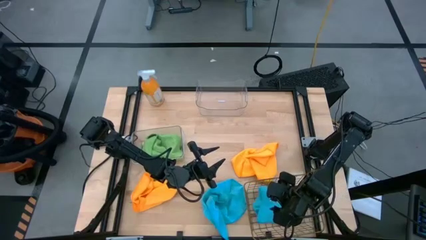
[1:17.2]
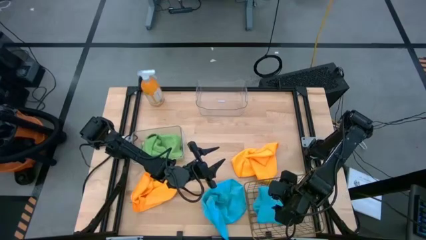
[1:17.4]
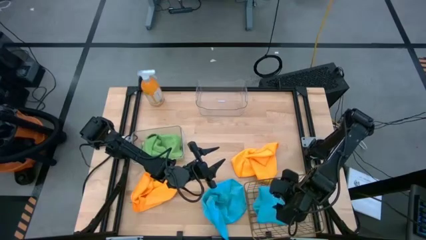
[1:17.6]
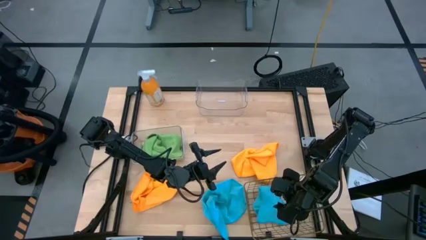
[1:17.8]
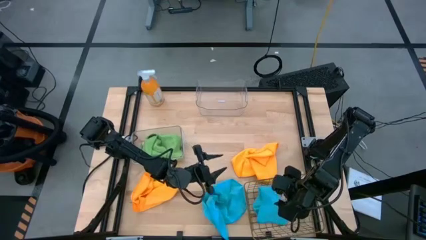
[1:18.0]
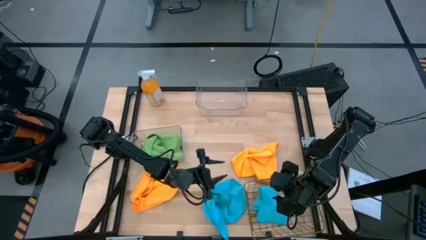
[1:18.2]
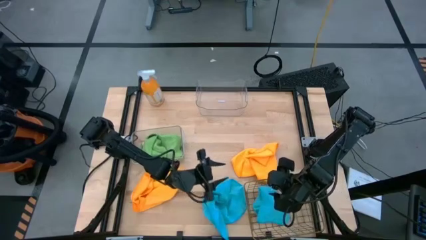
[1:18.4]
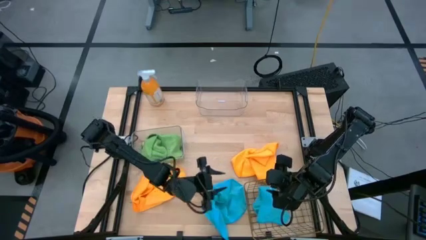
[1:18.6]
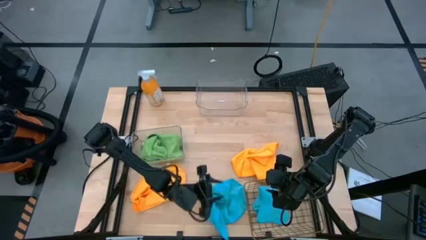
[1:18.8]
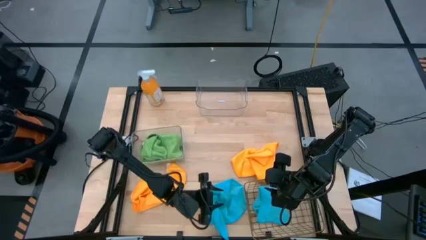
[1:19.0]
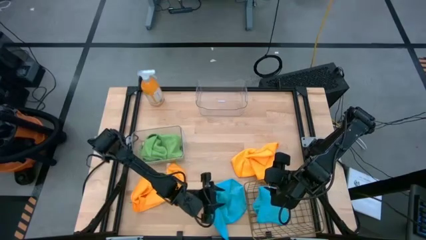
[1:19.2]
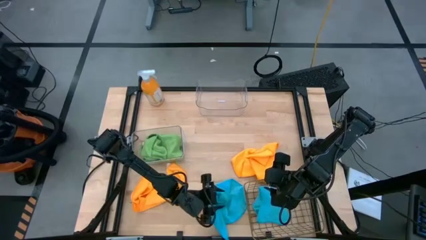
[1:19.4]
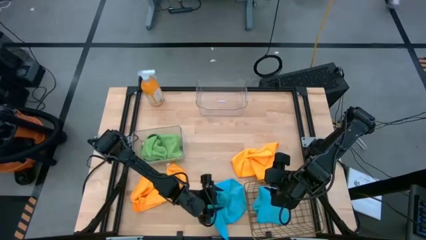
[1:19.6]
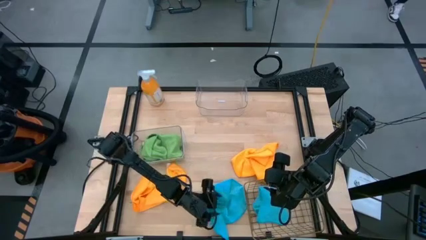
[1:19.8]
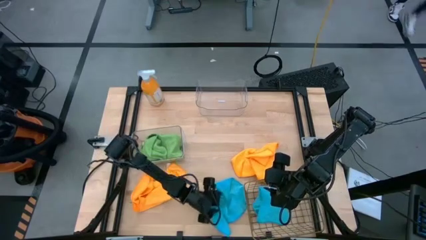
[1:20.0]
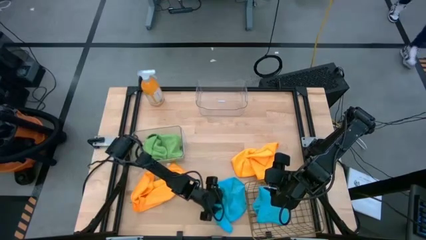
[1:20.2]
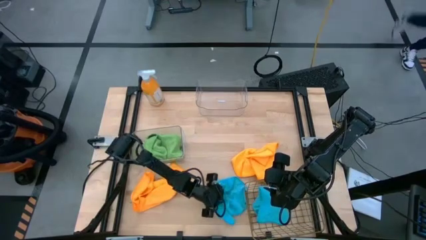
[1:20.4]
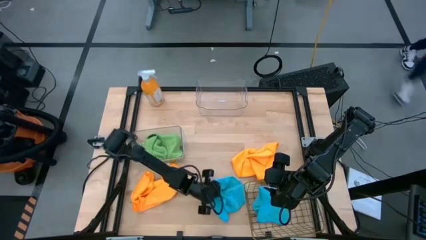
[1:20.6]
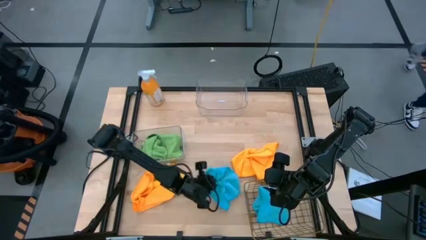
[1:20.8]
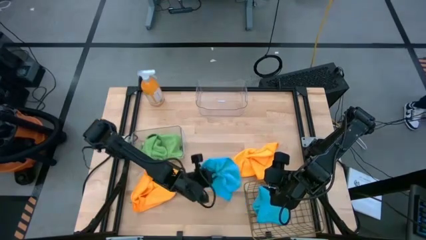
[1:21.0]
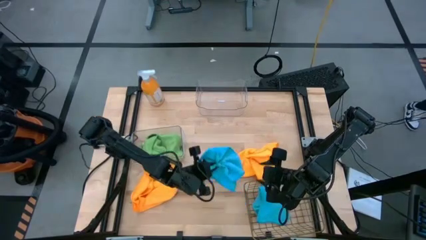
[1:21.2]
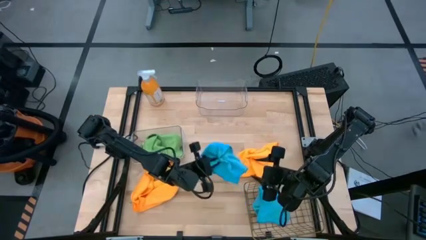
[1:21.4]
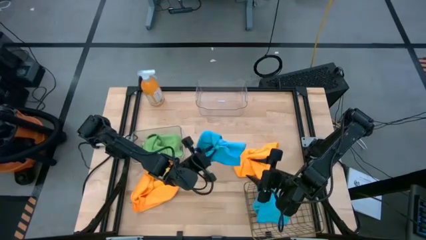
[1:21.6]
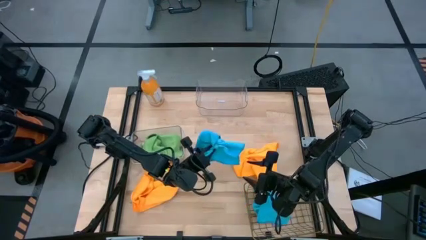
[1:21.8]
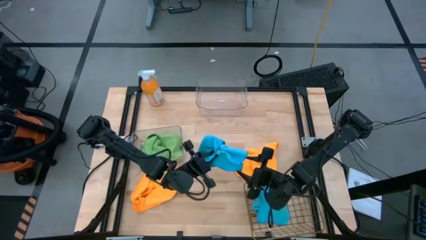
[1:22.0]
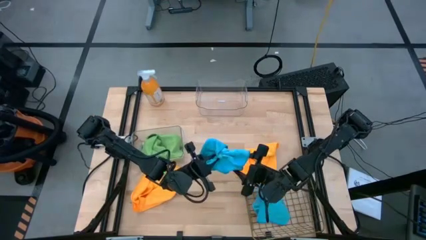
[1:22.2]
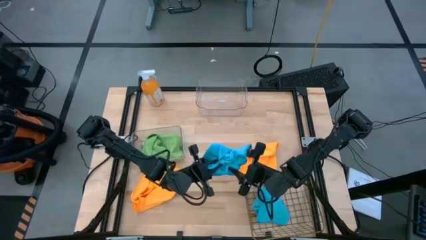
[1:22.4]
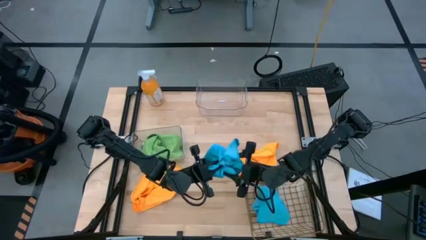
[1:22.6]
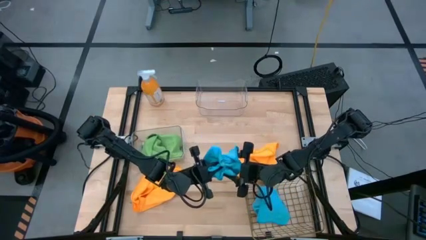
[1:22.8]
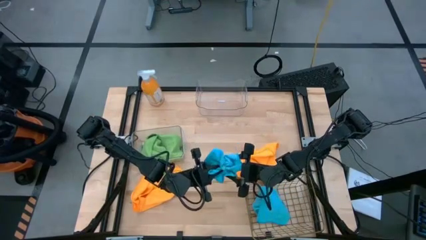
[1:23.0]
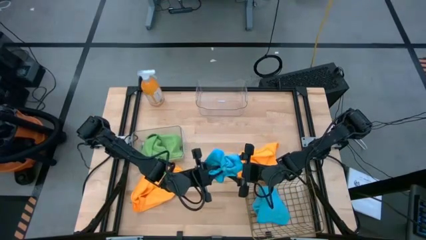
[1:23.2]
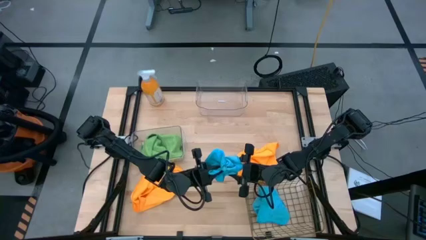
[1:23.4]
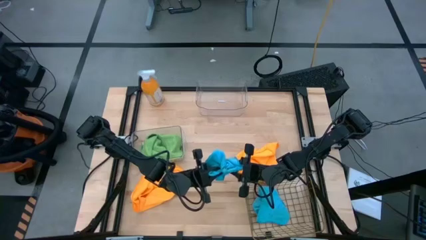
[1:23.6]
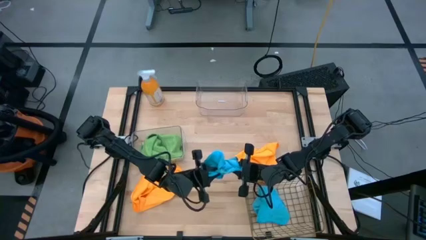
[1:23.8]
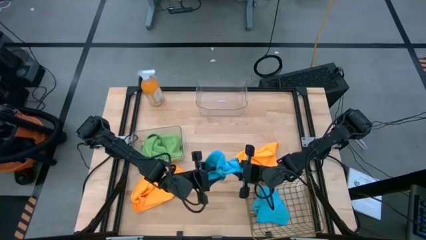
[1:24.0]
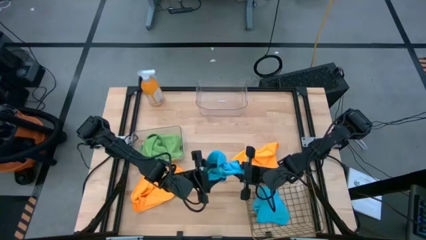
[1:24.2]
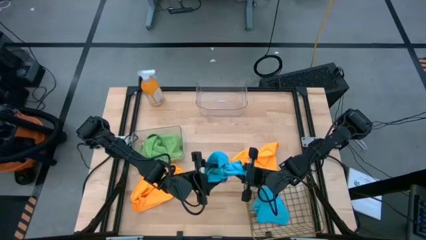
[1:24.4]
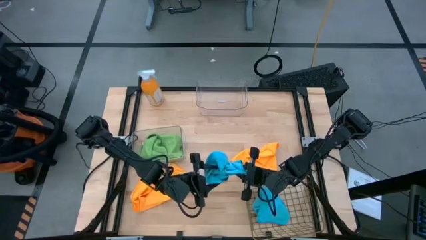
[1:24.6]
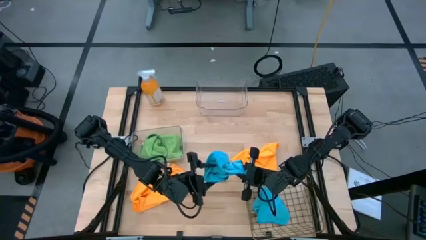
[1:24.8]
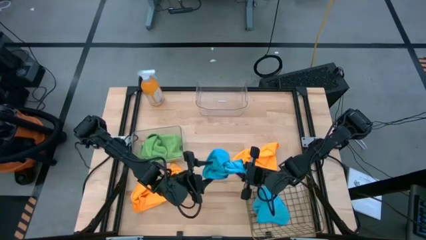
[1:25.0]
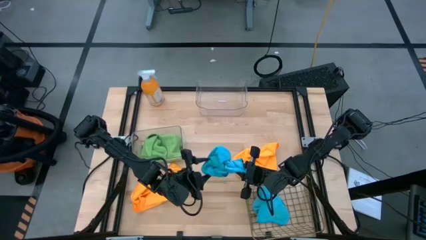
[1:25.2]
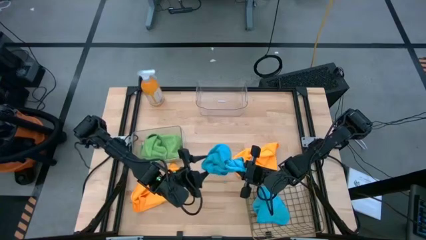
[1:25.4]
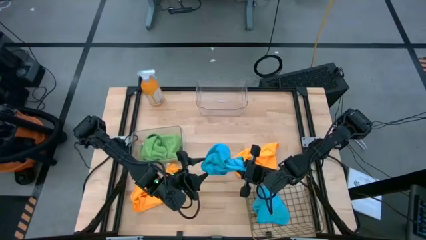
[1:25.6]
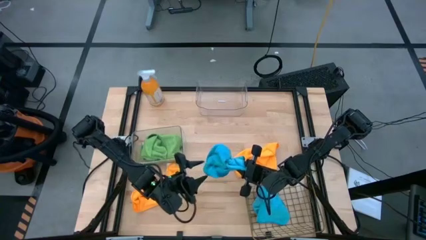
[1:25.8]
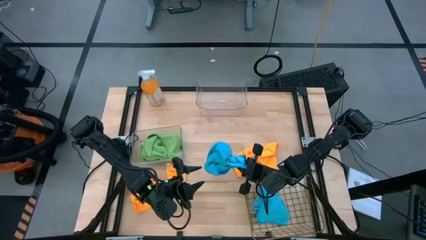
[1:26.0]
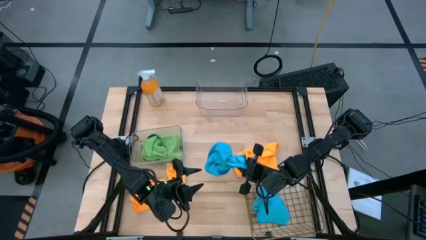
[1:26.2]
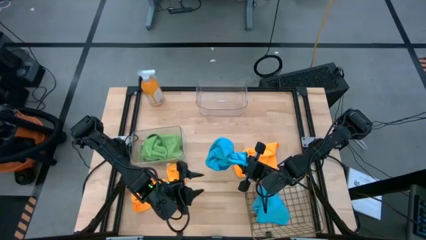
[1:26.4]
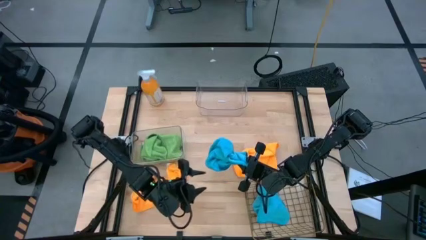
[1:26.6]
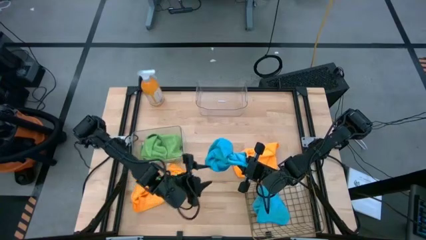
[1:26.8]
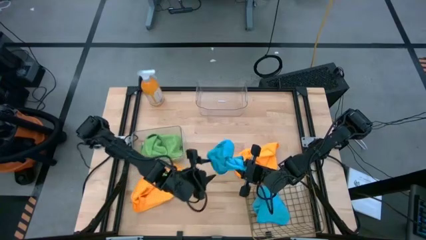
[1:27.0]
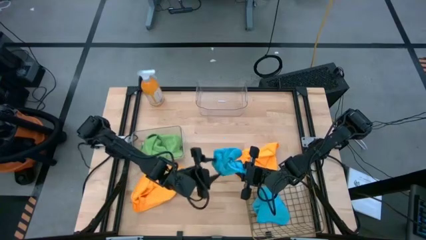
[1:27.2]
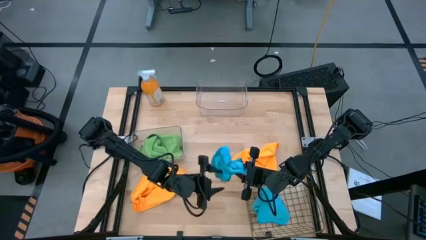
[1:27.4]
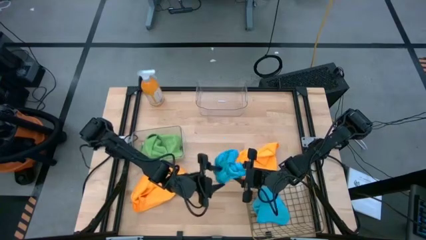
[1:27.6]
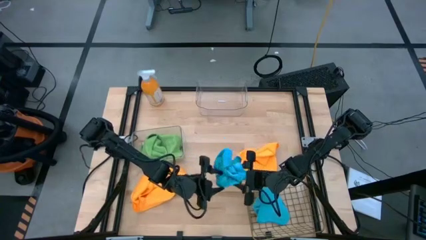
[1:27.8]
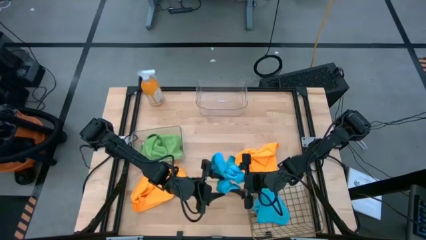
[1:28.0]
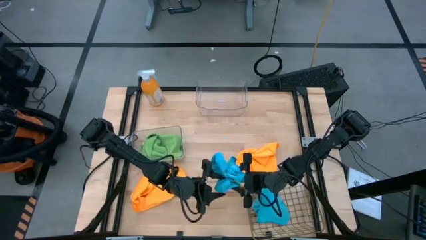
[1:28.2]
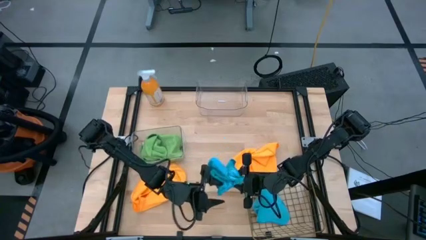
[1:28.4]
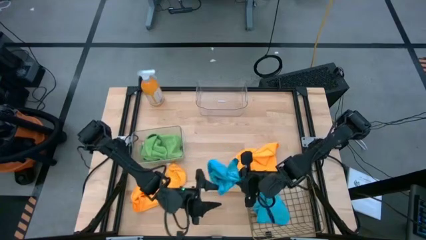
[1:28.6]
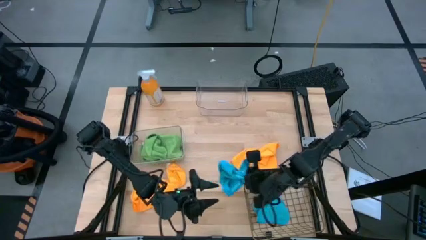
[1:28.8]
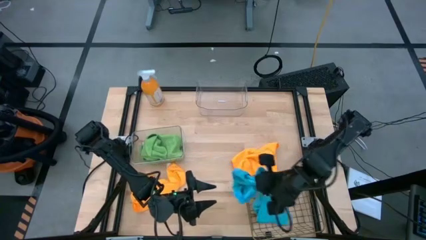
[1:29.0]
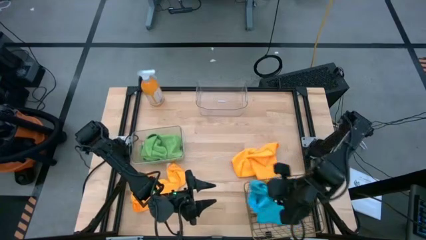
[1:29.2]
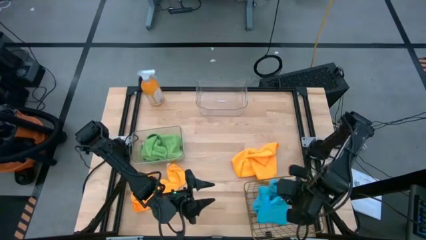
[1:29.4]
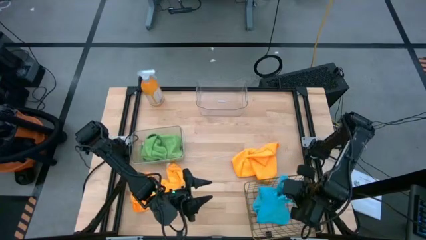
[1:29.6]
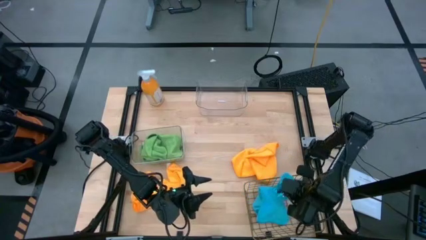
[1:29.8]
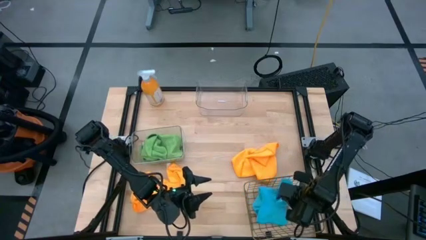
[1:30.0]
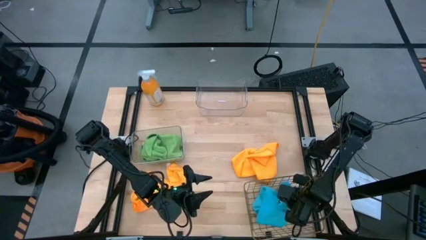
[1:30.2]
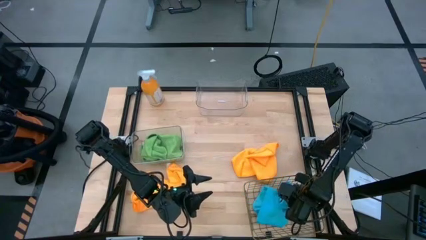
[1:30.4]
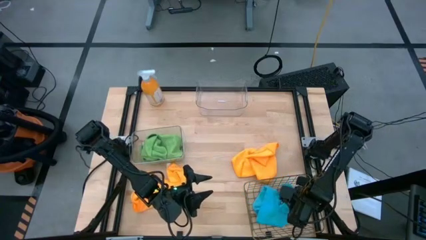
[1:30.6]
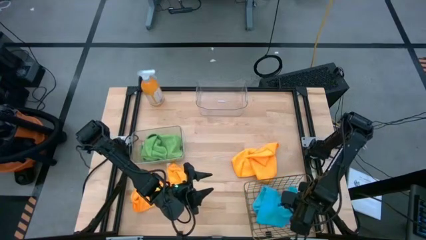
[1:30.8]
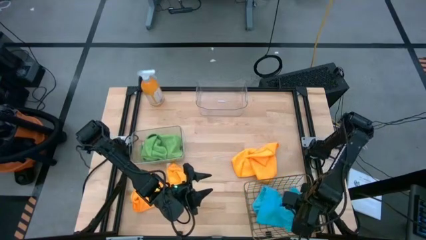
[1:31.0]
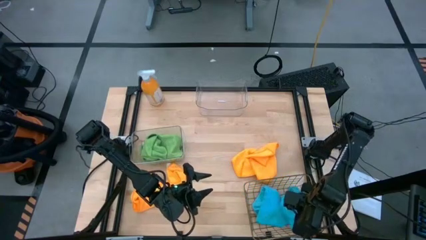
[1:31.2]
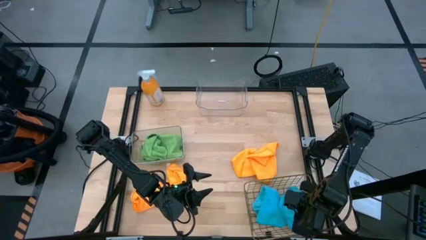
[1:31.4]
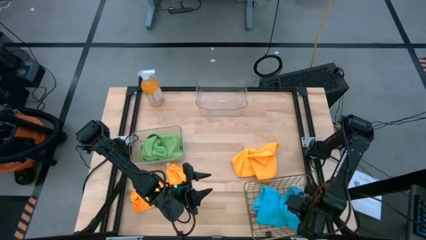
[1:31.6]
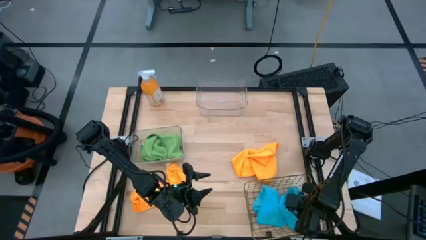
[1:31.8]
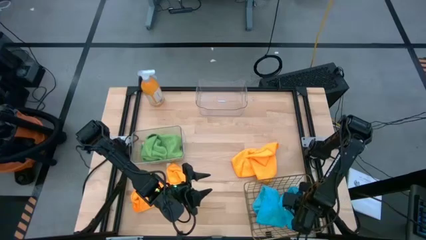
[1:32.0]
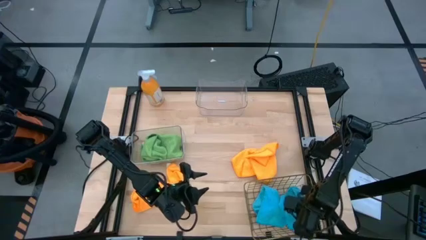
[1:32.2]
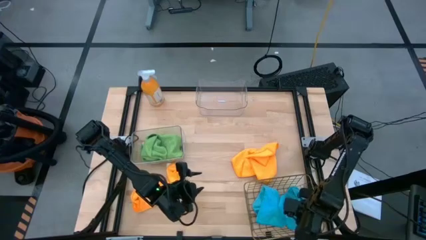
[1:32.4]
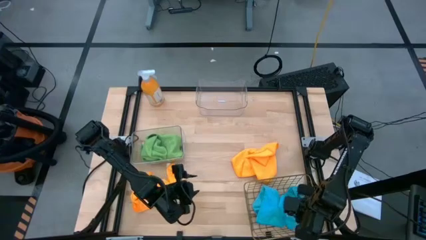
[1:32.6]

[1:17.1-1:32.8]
Task: Sort microfiber towel by color & place in baskets
Put the blue microfiber towel into the wire basket

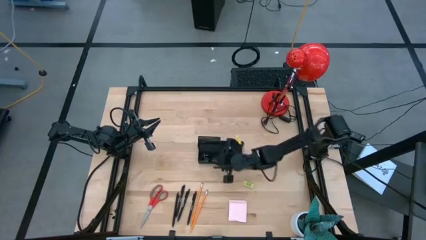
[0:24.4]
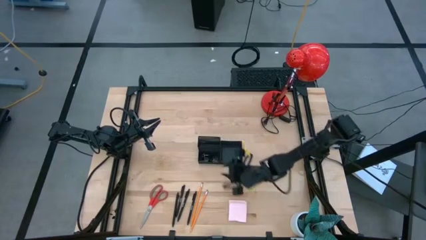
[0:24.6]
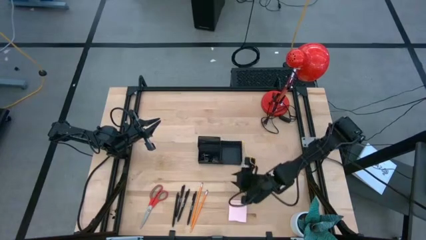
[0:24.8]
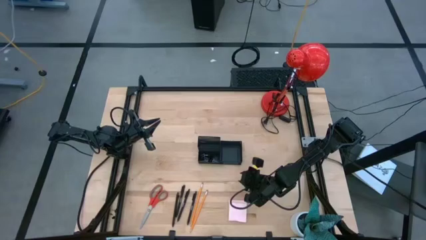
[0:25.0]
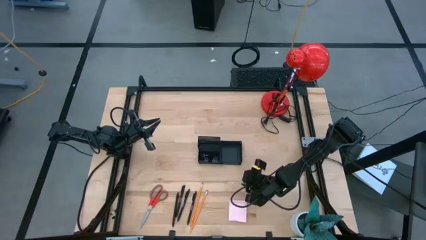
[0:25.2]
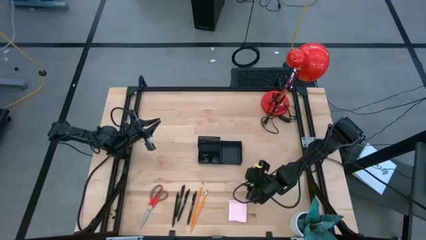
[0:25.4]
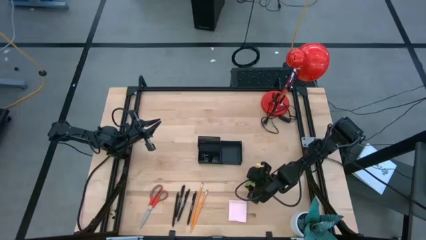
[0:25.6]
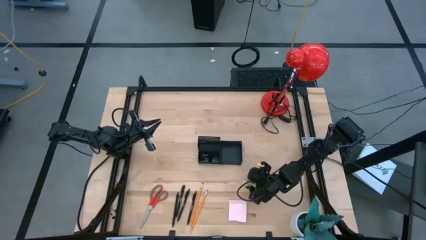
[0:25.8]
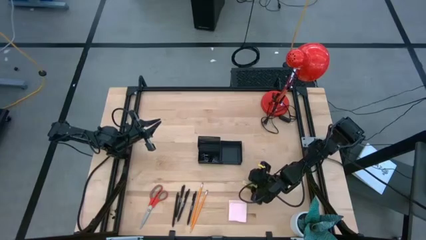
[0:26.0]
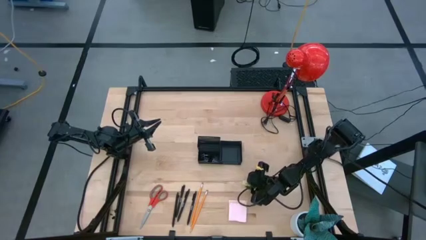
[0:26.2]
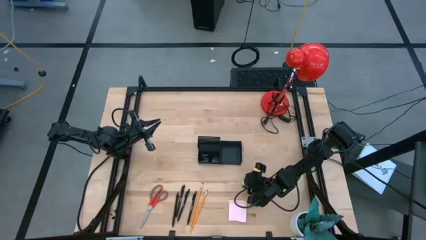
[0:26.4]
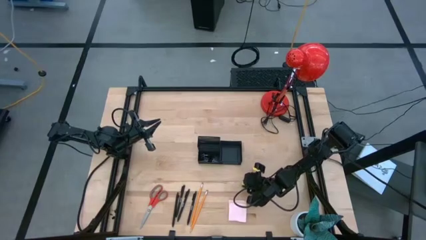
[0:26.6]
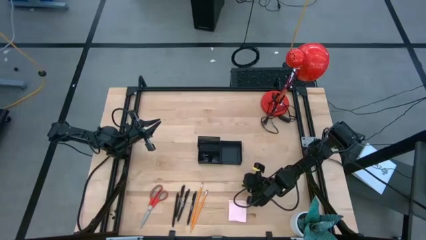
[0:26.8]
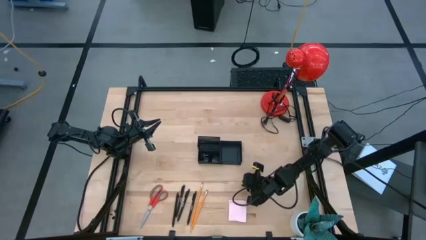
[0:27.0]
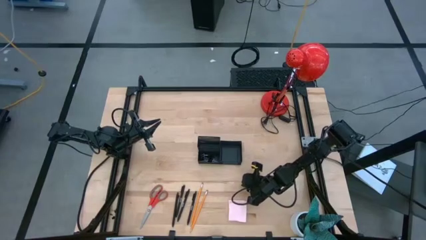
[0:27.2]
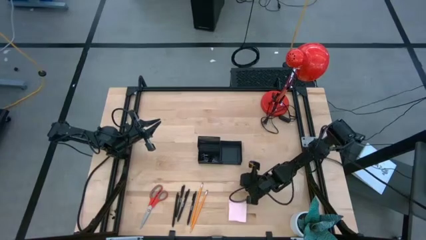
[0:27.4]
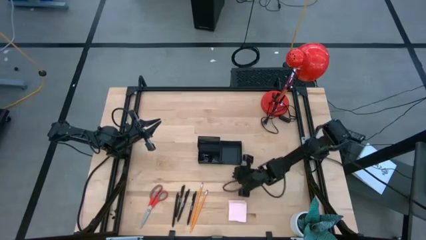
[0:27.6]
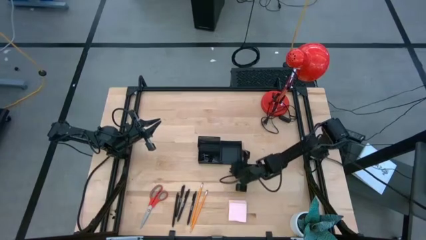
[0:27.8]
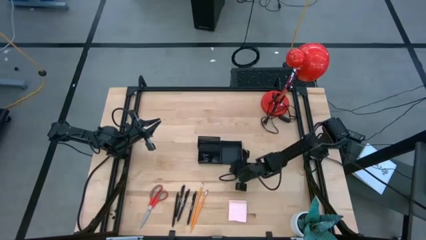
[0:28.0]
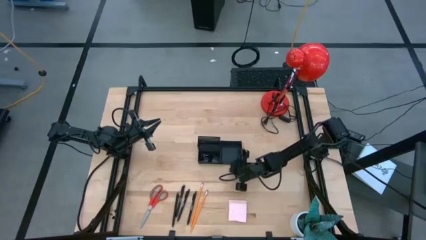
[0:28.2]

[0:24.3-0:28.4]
Task: Pick and place office supplies into organizer
Put the yellow eraser into the black desk organizer
